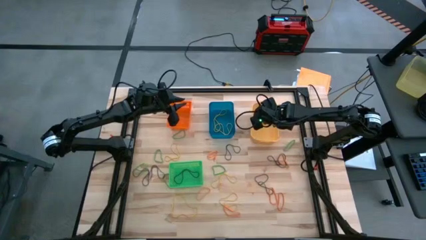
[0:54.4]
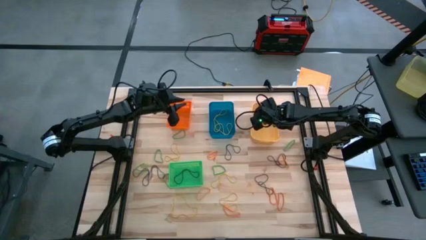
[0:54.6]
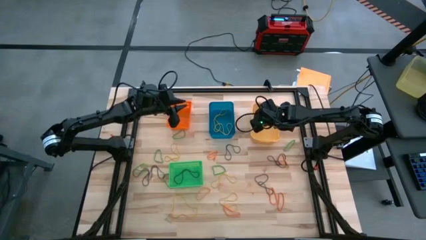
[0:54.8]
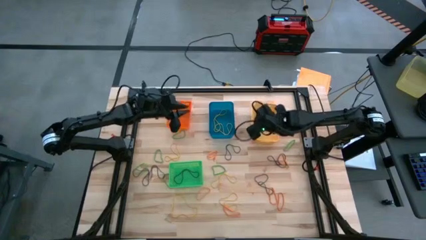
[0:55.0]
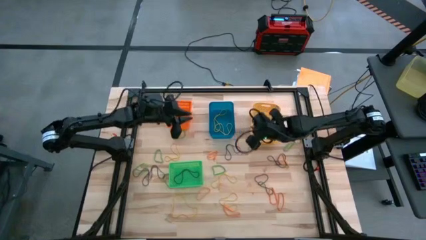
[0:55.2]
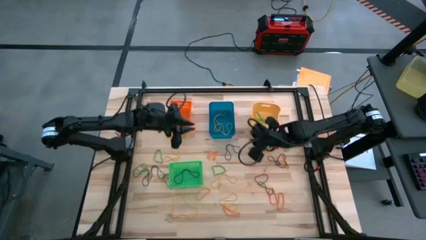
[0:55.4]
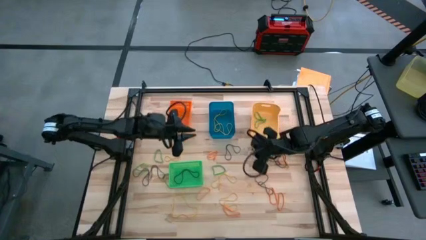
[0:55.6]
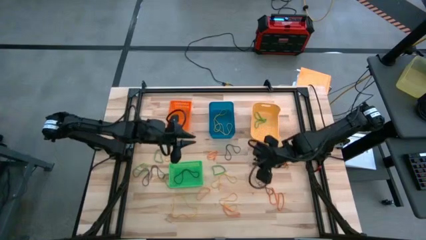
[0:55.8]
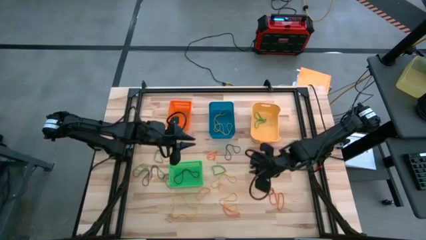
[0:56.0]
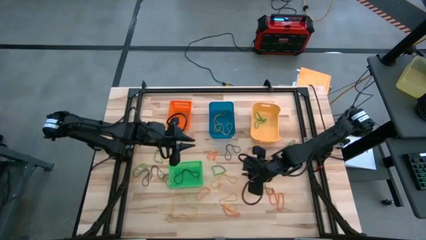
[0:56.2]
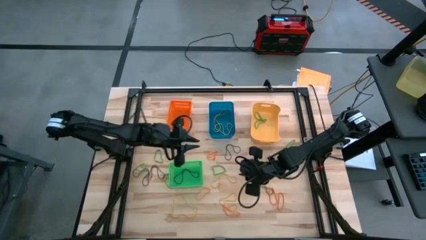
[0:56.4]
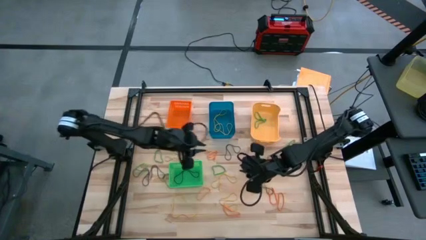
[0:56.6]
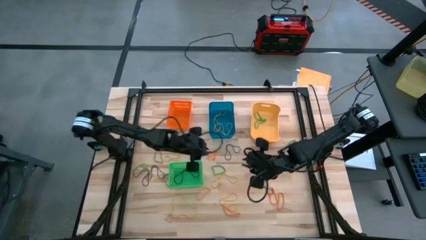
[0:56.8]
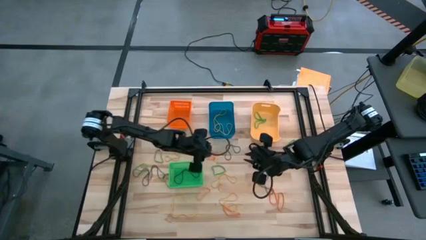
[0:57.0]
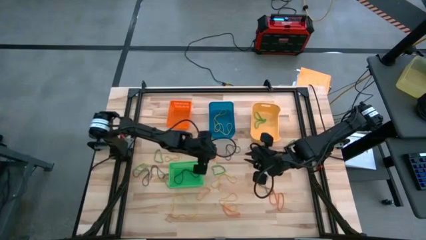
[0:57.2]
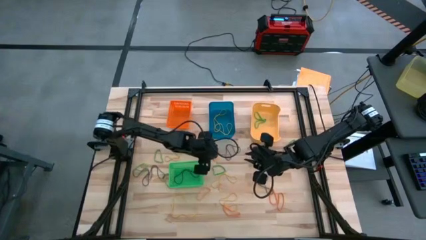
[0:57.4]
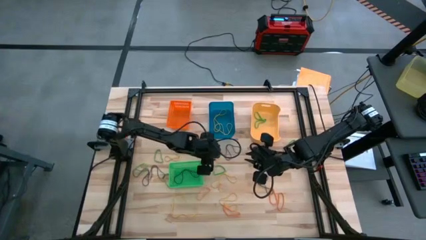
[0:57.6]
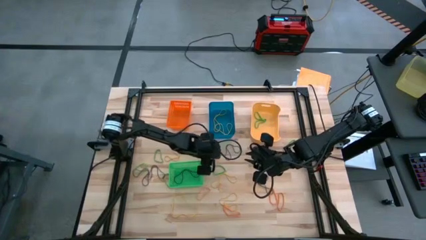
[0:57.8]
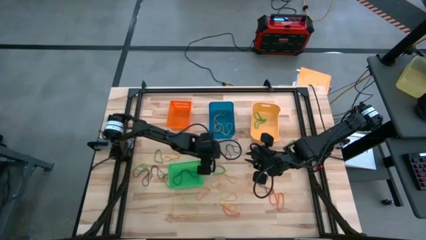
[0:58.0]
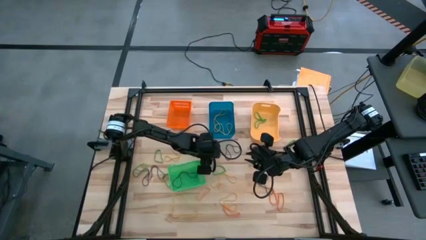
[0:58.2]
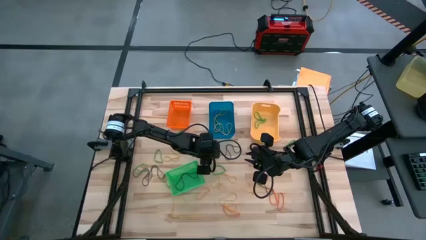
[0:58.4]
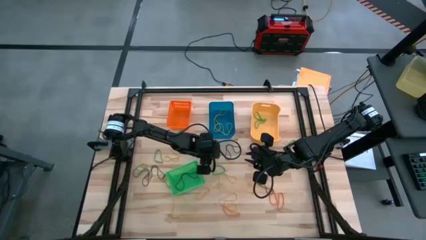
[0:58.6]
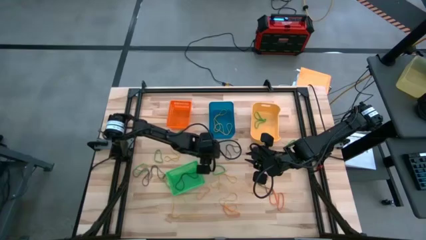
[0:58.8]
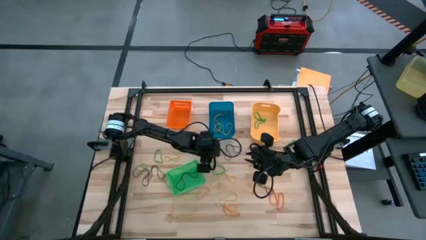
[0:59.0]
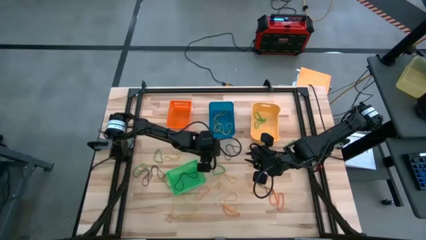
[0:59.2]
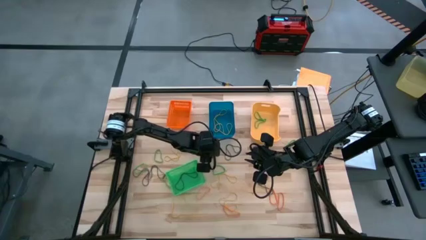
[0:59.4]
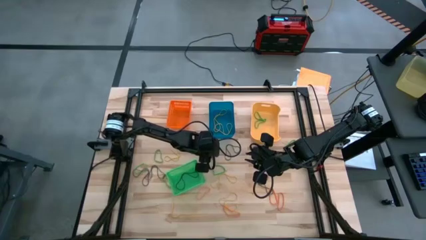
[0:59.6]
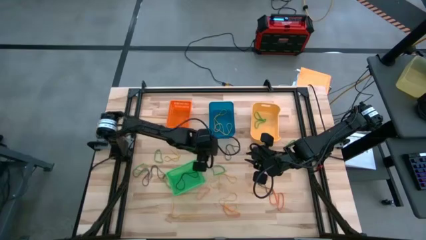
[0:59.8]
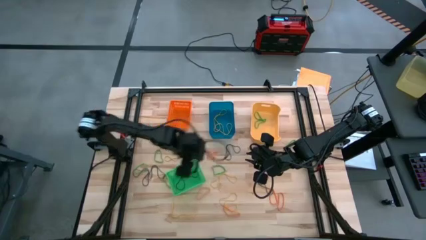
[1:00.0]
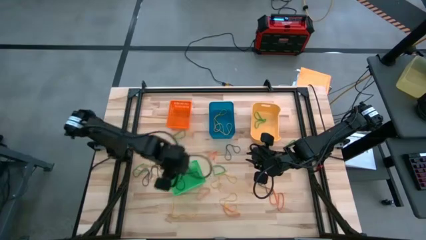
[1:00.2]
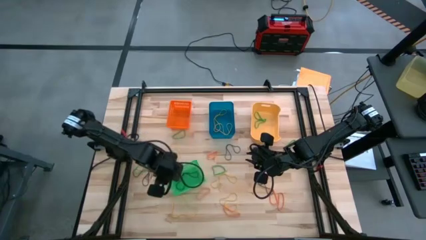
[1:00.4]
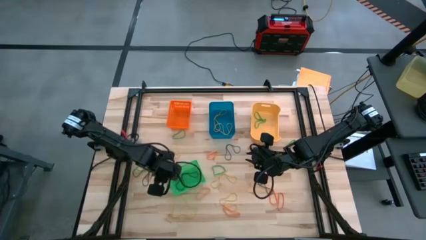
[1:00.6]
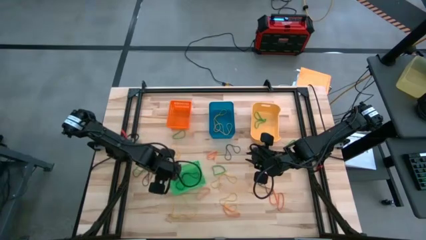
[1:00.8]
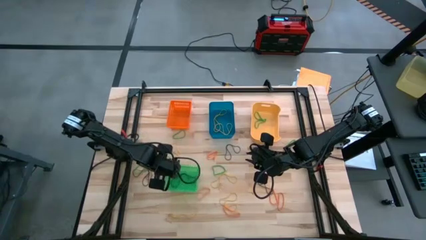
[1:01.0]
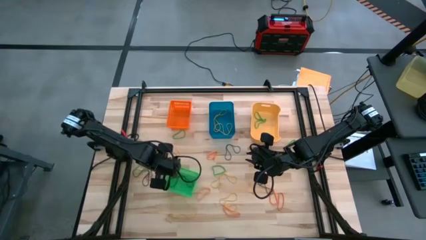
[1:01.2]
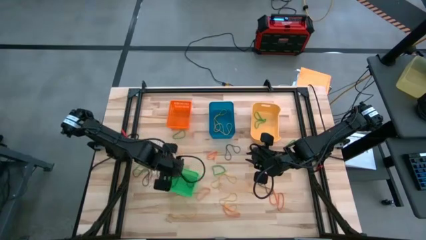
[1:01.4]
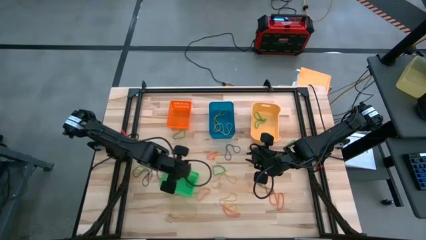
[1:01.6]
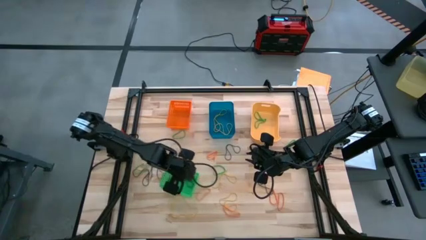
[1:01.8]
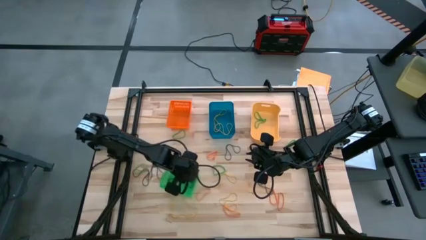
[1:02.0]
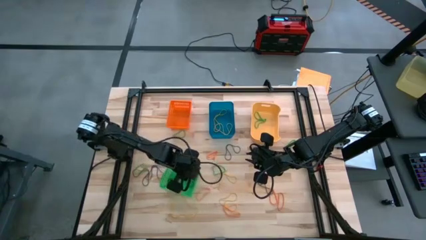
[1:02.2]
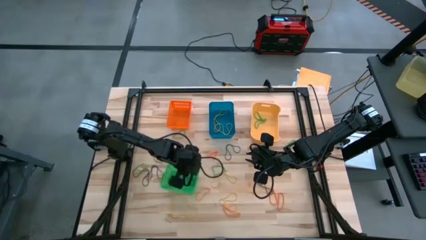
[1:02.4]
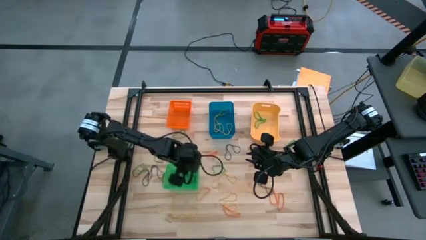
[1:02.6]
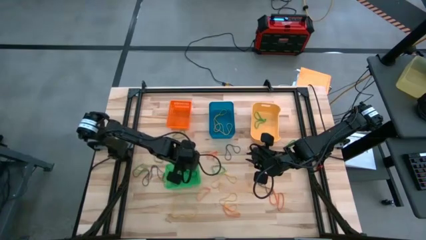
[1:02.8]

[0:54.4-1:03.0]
Task: Sort rubber bands into baskets
Adjust the green bin

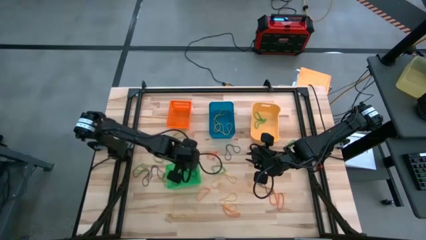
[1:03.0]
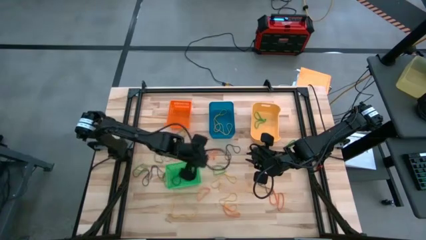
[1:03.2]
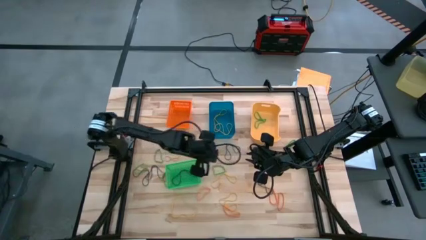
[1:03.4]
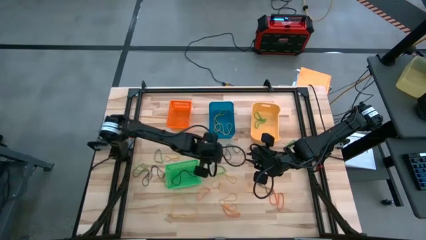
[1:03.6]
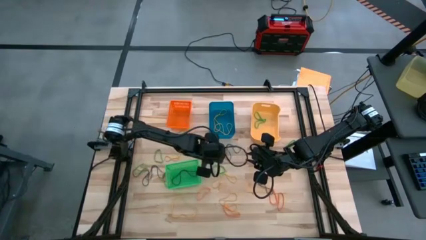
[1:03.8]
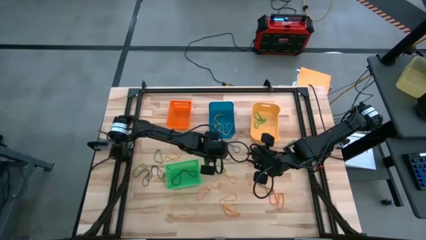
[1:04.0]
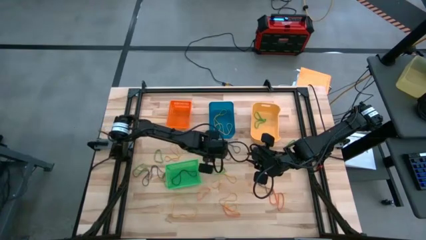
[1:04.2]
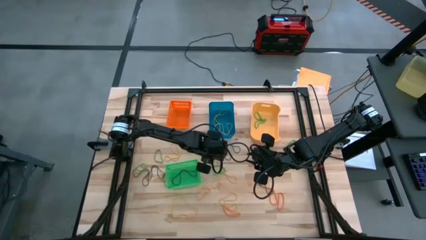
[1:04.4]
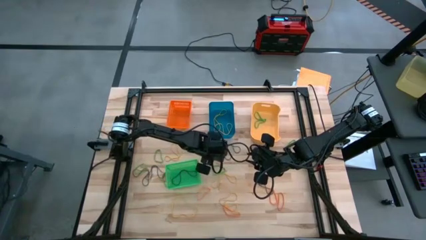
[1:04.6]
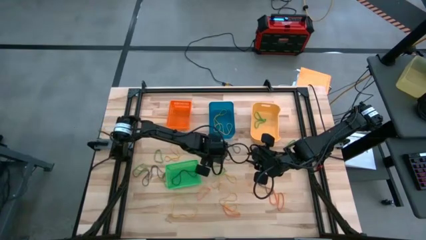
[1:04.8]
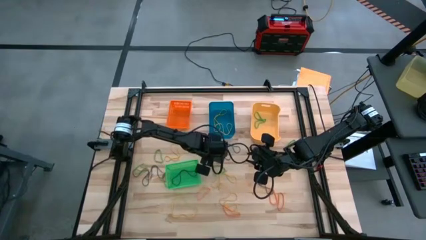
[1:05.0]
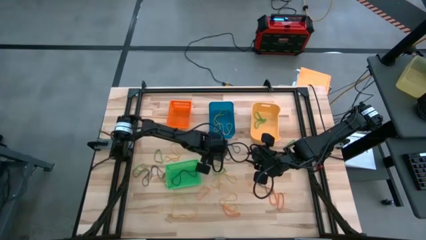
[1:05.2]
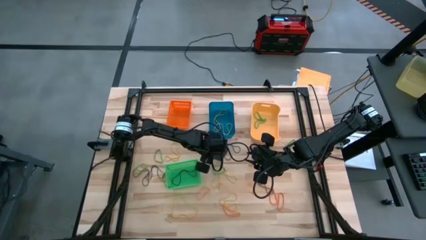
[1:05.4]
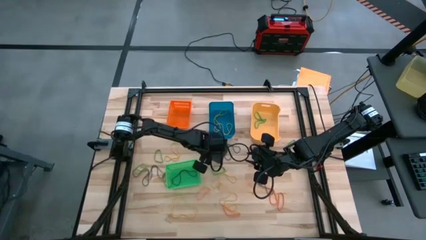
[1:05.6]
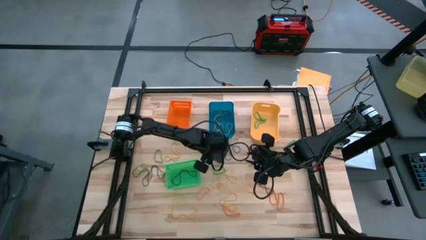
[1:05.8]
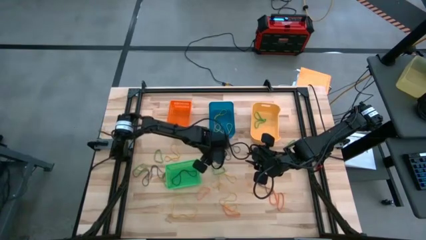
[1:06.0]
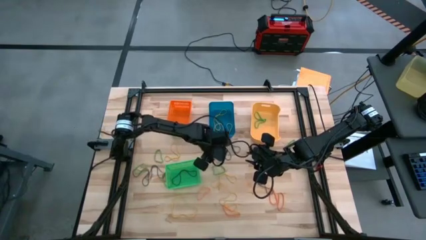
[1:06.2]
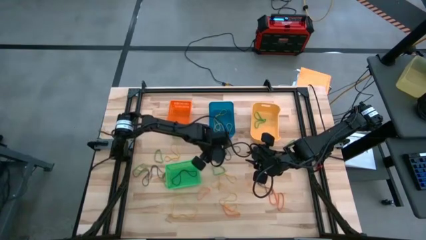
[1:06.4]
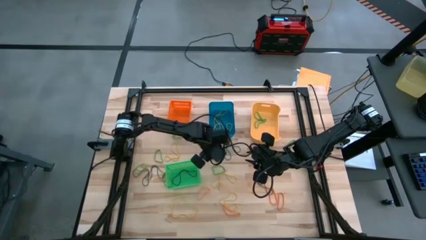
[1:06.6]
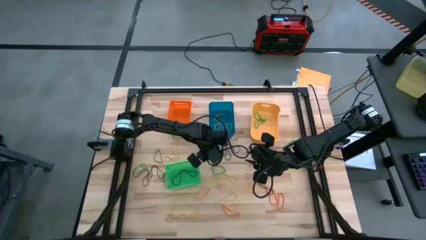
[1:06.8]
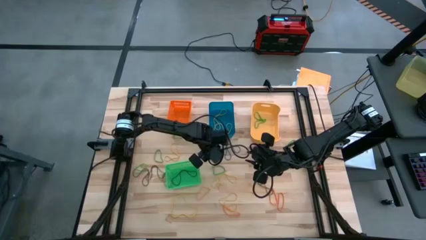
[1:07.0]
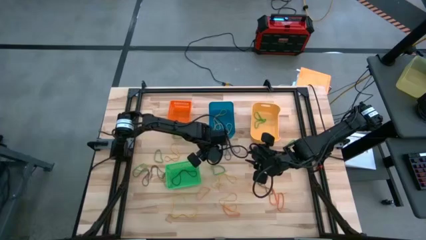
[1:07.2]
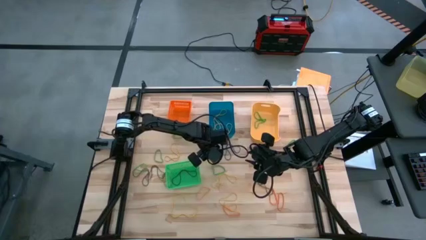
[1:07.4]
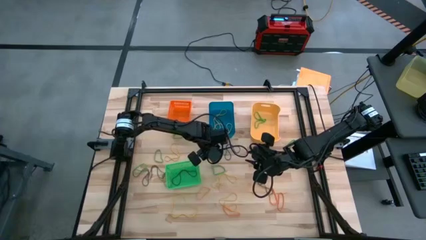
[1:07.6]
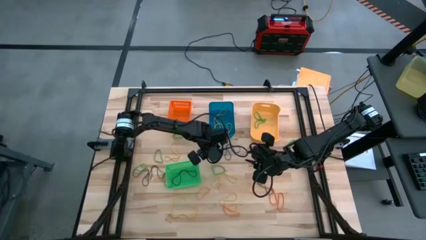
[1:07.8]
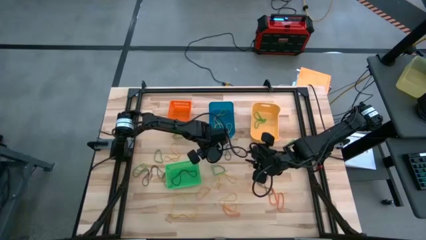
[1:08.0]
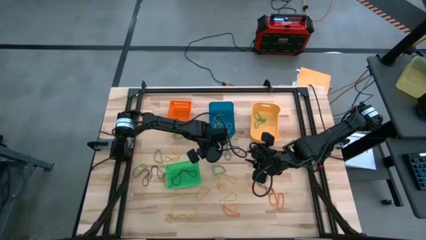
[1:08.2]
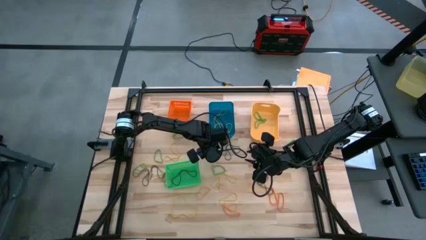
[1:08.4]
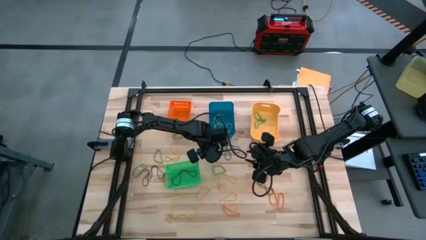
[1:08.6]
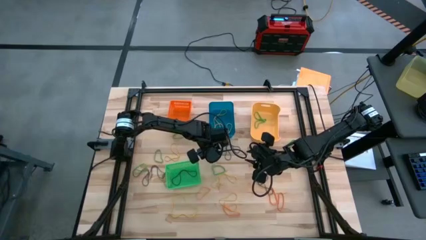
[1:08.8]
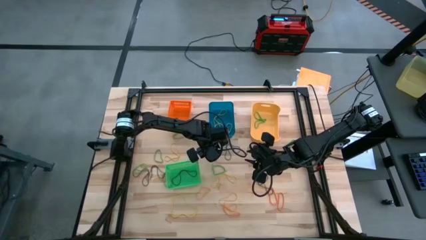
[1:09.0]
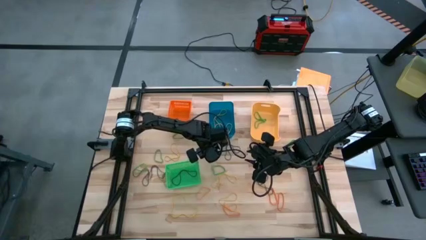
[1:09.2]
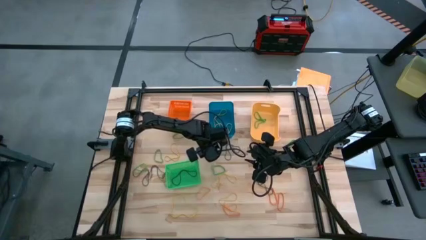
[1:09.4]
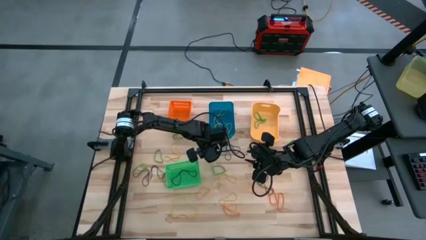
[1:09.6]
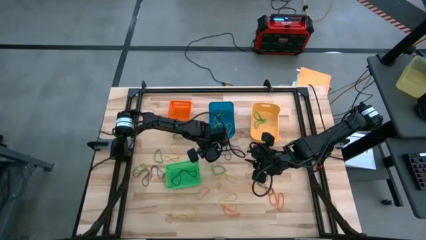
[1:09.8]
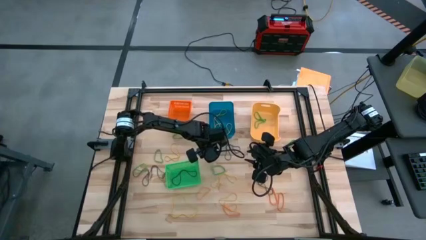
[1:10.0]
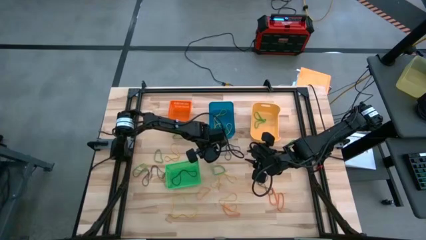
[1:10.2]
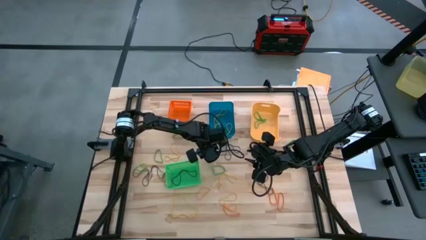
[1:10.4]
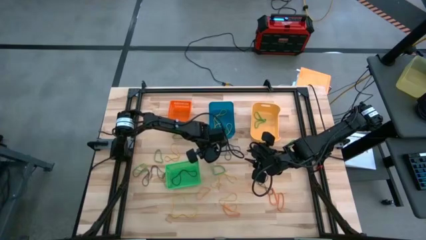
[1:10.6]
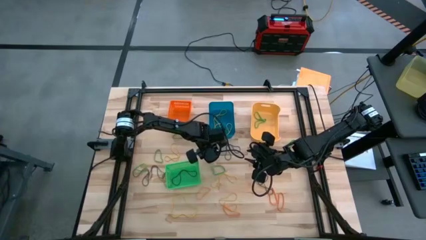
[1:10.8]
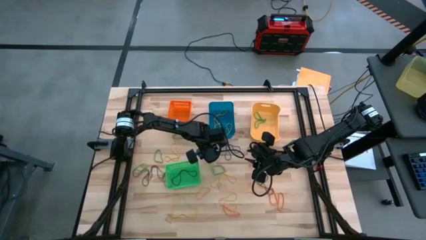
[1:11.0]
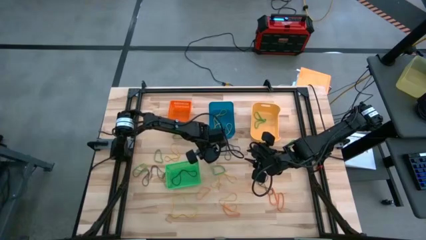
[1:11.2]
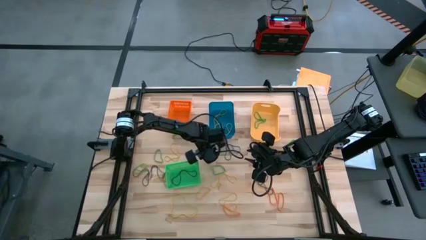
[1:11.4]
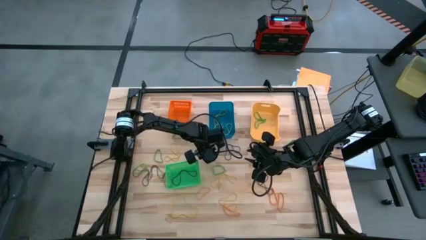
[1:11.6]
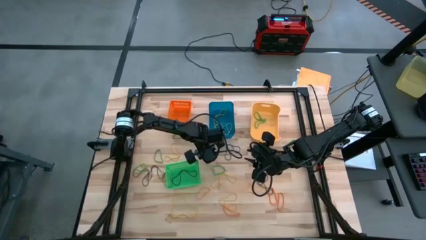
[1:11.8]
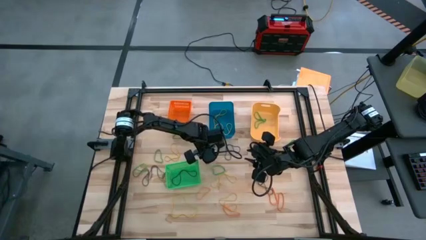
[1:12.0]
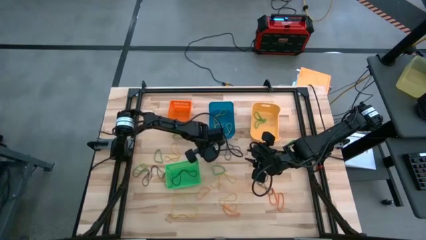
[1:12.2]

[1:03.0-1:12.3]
Put the orange rubberband into the orange bin
